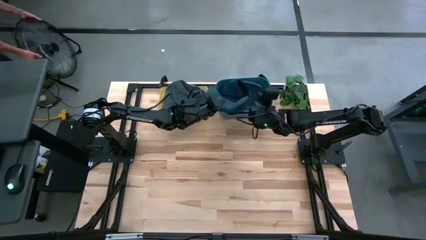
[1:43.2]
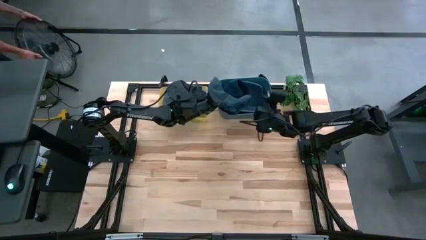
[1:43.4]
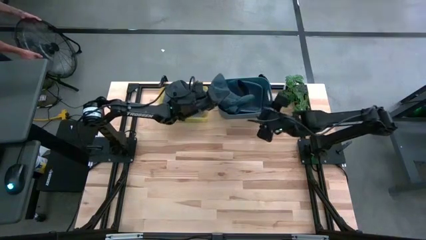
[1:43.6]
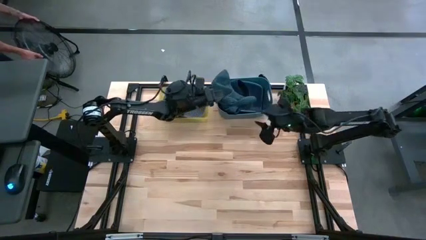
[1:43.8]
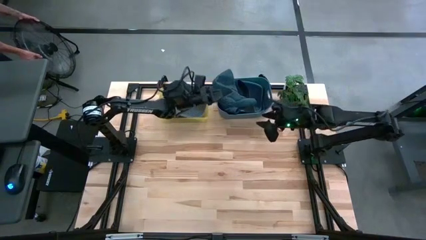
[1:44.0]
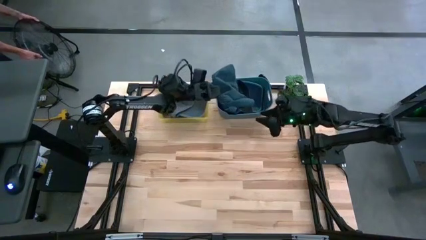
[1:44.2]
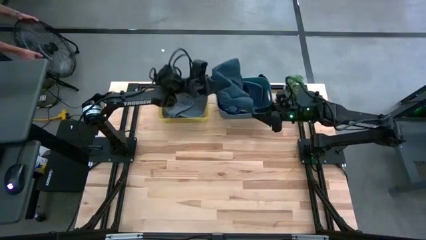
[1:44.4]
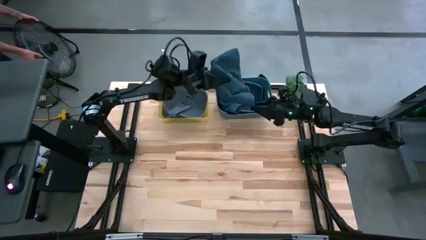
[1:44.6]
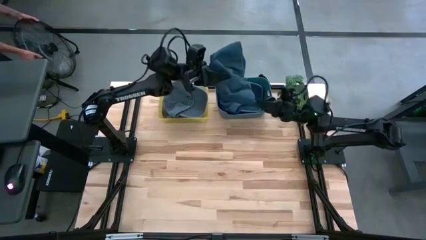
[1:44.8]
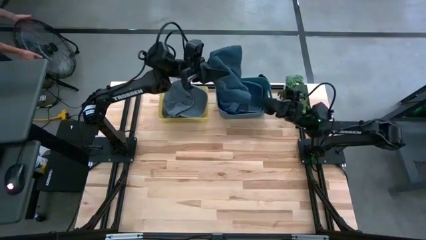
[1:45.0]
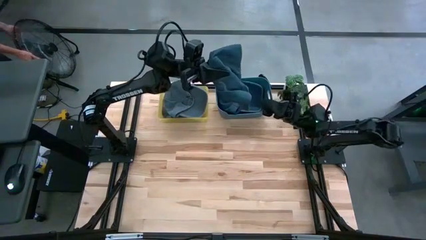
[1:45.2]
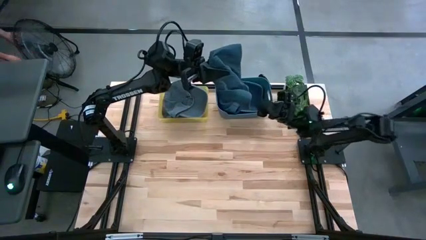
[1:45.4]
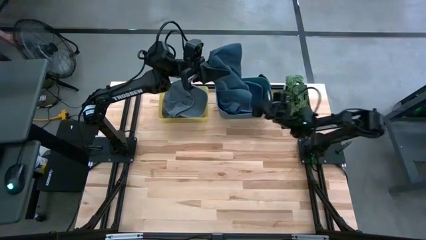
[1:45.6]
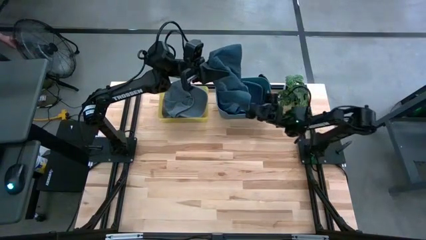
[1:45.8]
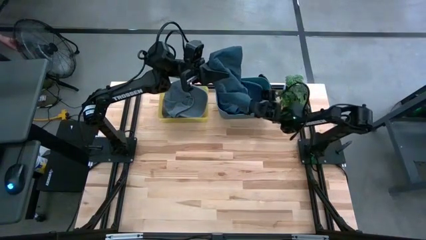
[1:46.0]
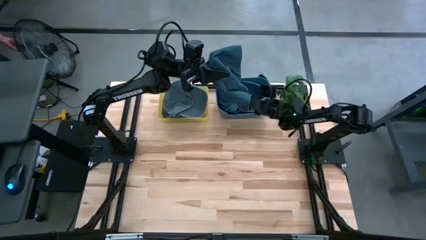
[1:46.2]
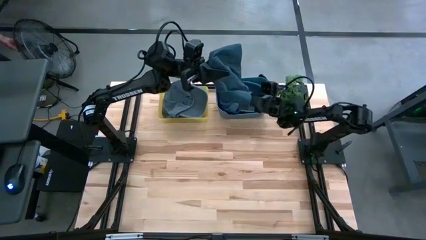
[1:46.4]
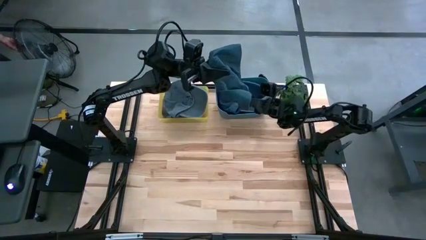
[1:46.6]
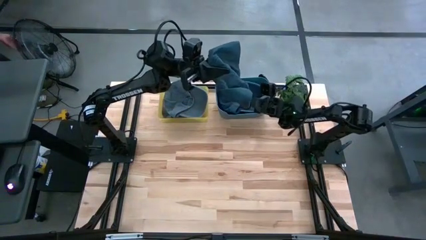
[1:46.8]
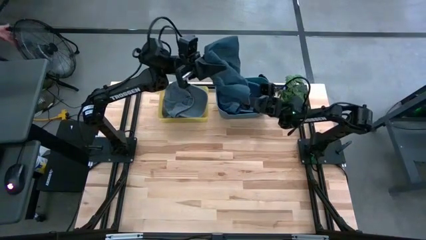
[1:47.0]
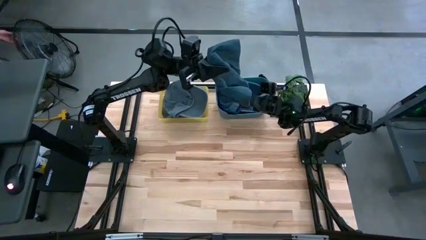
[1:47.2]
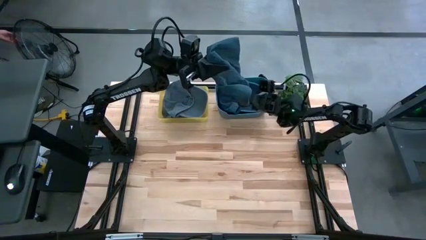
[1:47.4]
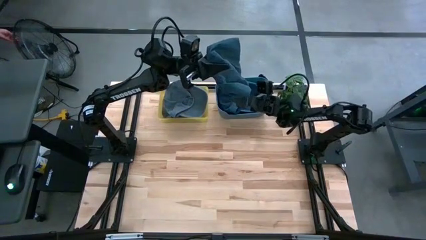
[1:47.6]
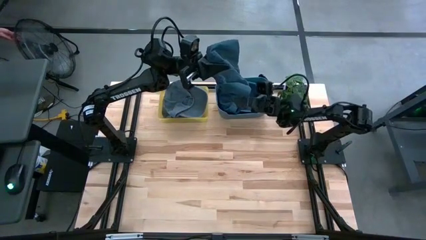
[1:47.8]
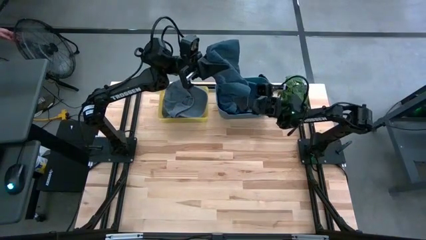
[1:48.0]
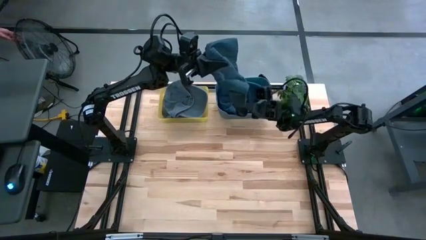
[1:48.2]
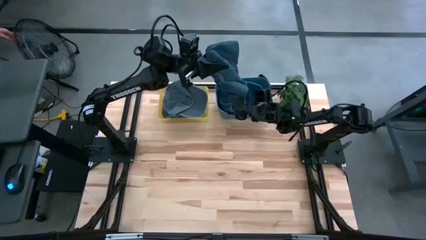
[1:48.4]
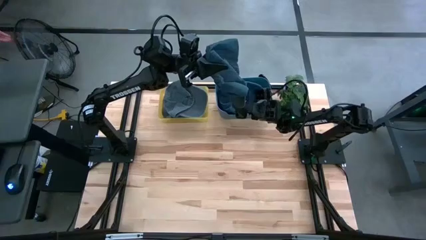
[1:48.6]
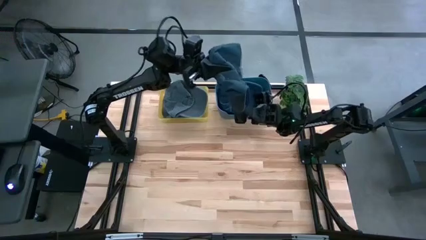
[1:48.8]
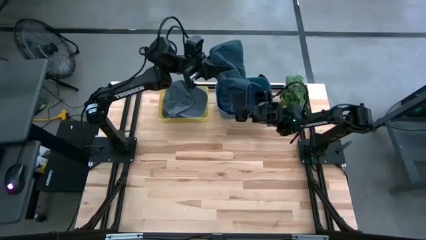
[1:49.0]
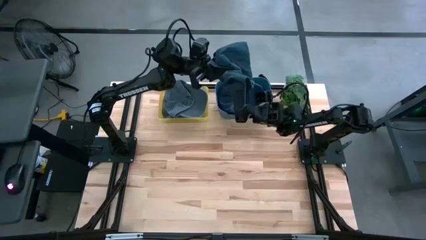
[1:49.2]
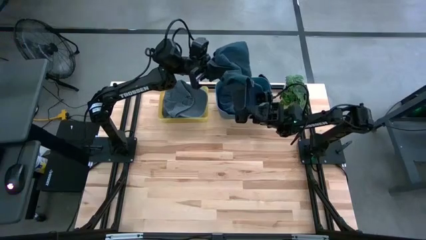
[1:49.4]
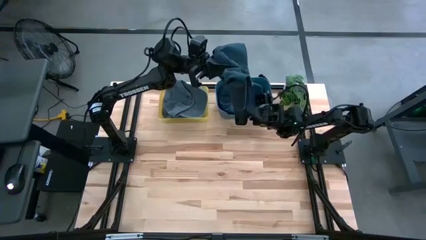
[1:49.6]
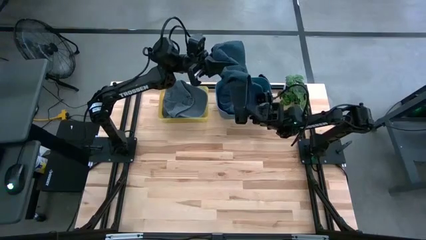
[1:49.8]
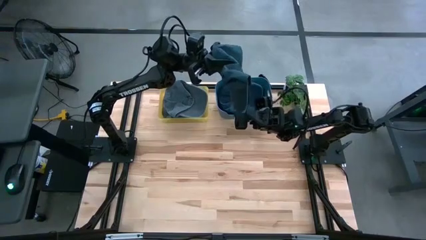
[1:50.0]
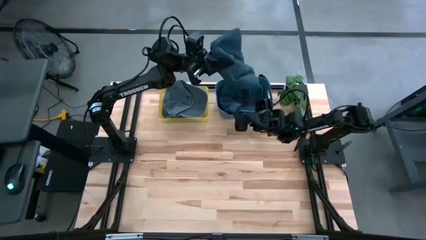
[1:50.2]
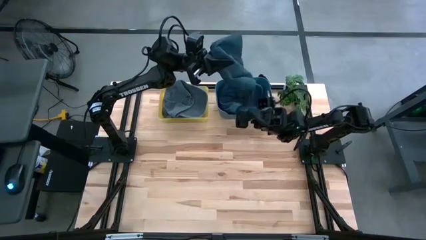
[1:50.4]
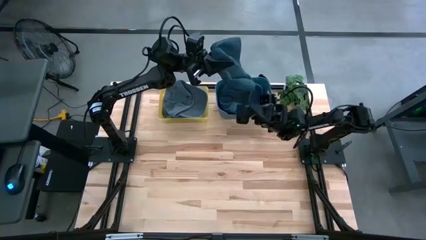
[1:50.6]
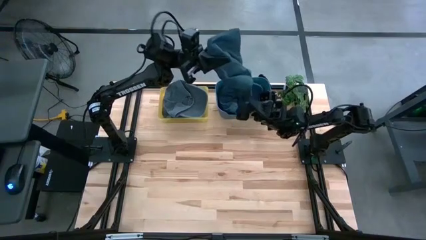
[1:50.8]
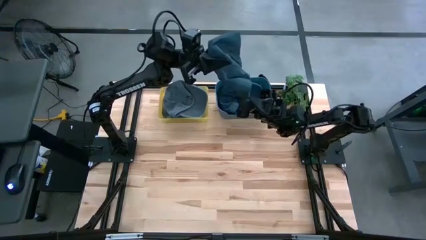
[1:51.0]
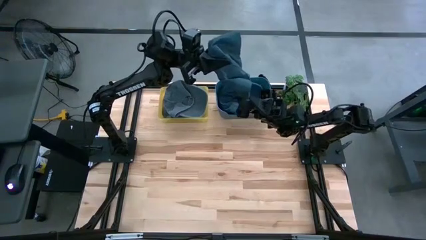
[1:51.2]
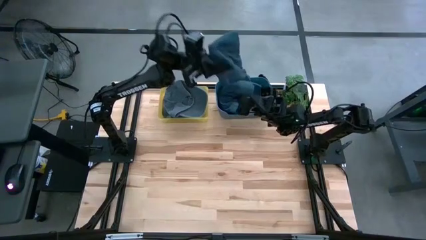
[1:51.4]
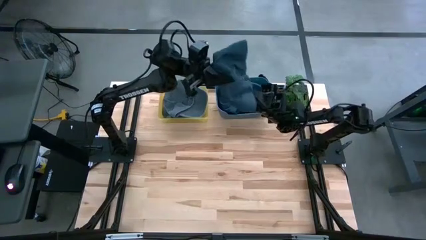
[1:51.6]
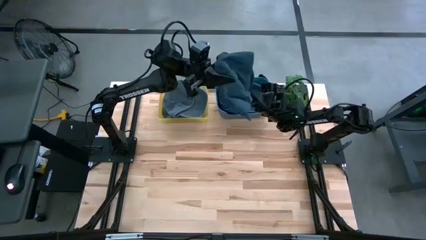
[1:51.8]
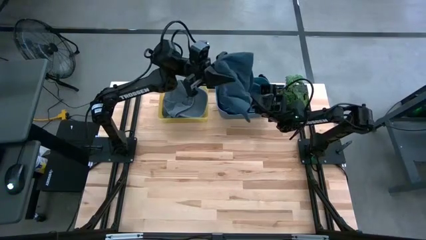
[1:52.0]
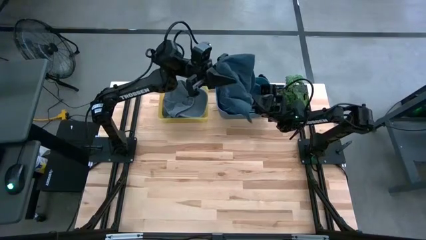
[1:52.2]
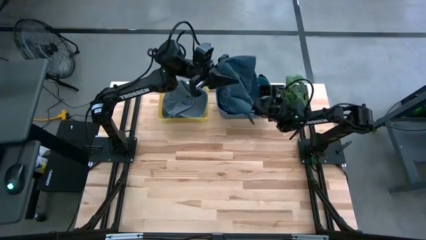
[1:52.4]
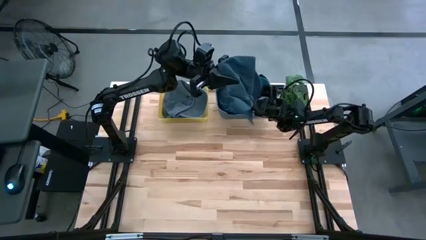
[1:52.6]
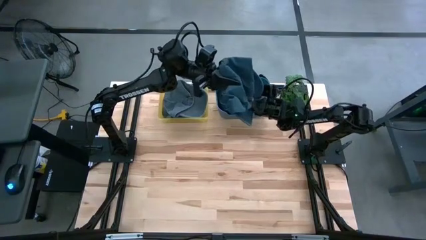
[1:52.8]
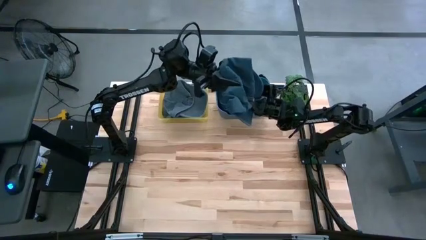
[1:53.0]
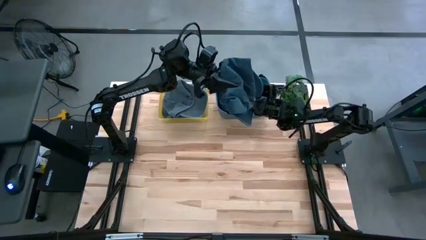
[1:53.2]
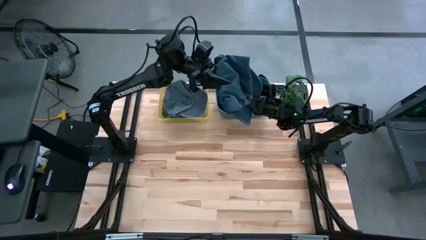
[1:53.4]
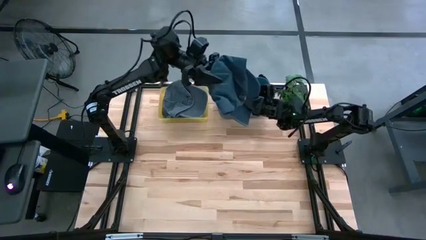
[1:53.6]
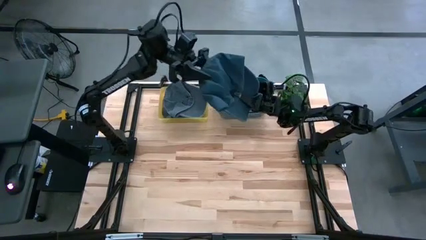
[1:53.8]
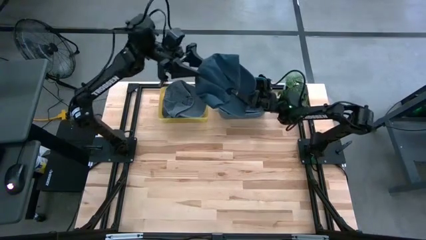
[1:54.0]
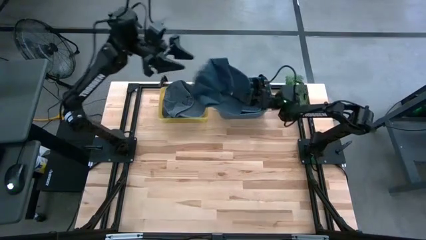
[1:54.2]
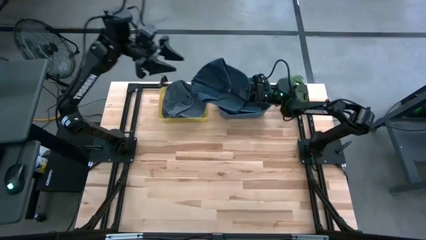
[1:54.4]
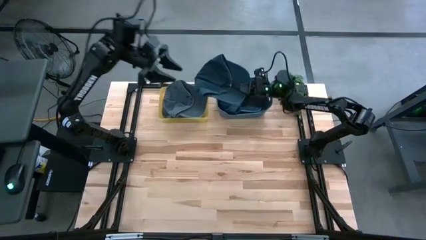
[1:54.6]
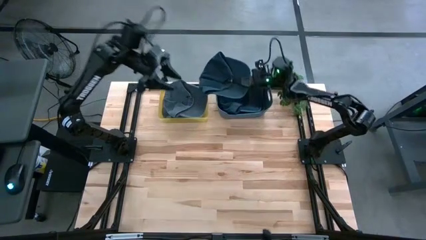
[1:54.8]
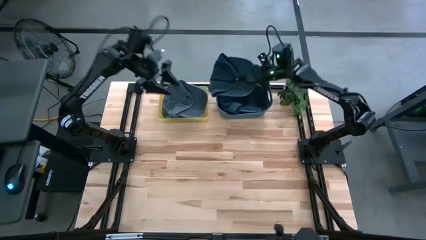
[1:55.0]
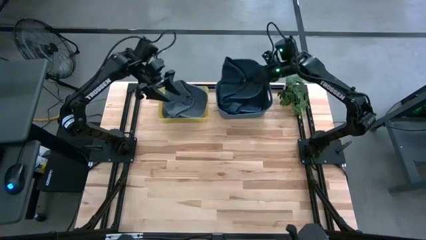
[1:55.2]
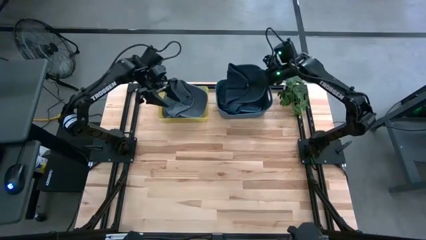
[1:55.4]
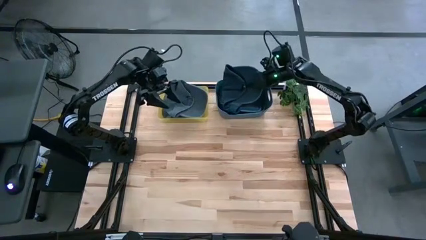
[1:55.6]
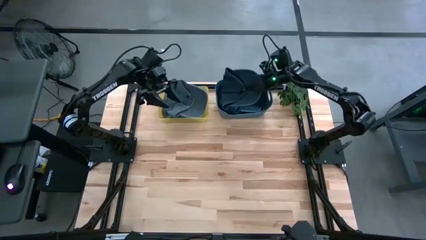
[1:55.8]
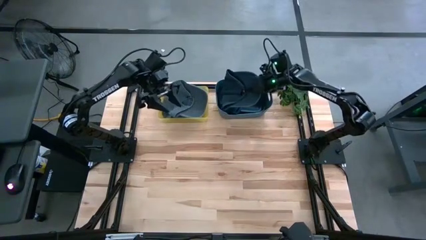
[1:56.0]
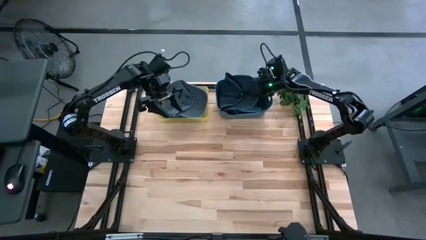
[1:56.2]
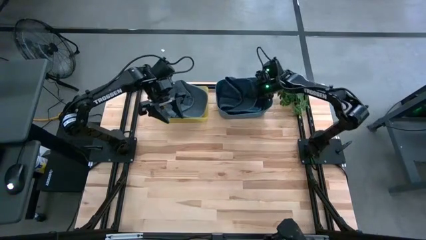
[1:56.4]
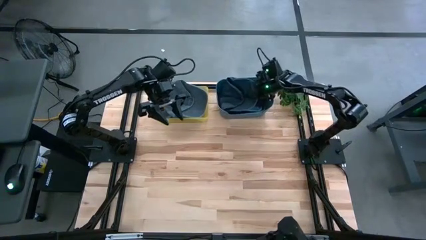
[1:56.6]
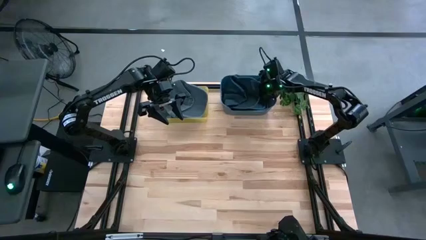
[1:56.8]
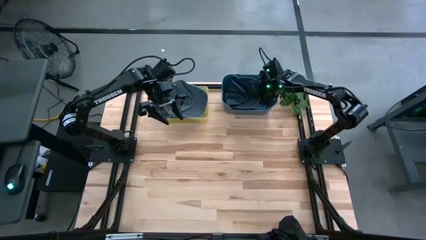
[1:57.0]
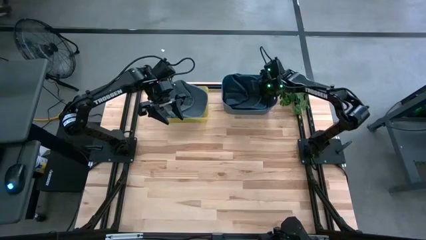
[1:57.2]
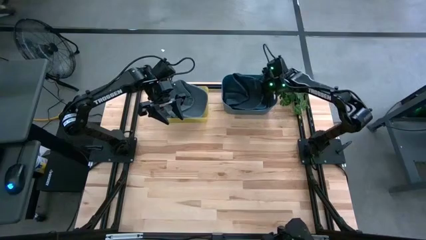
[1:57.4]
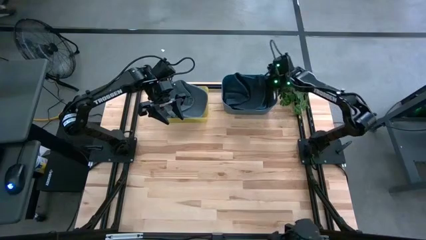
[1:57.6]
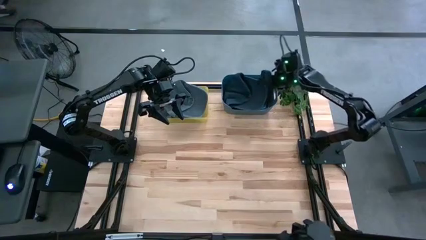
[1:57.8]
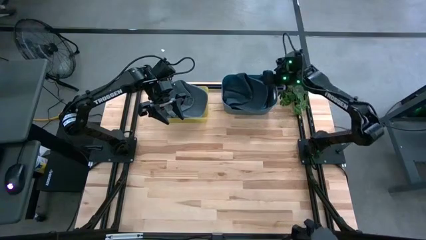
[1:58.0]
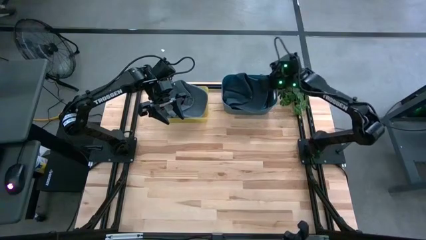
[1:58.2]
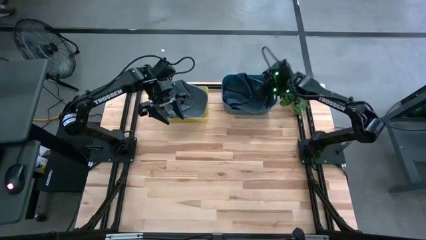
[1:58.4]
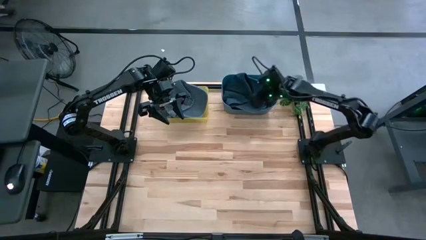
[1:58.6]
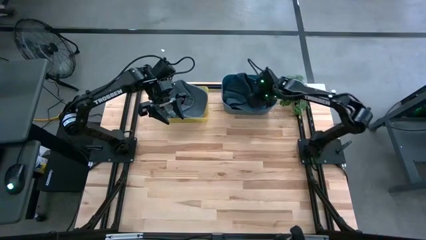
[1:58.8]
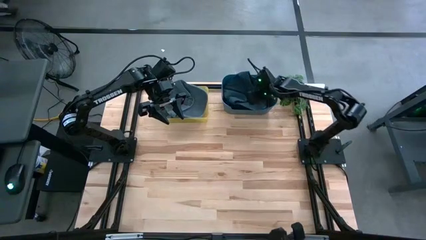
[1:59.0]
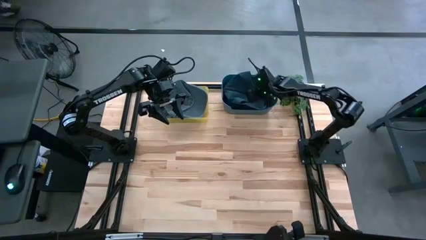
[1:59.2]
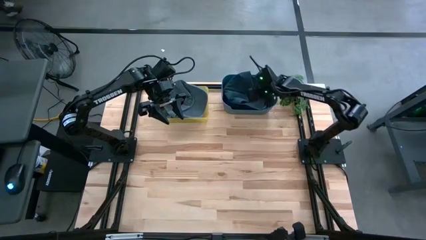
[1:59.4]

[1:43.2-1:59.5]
Task: Pick & Place hat
Put the blue cap into the blue bin

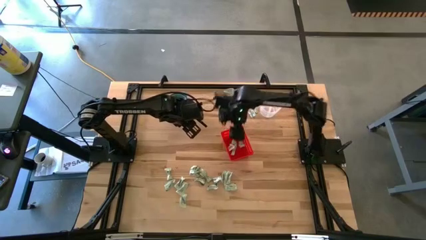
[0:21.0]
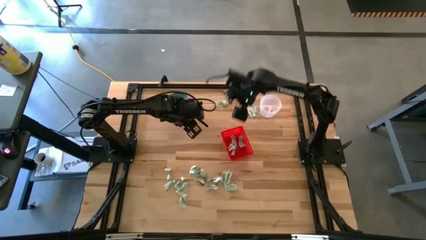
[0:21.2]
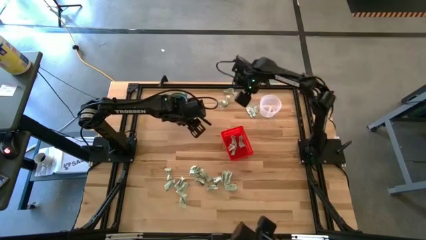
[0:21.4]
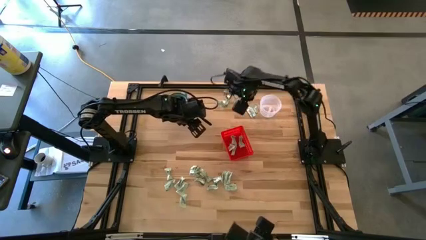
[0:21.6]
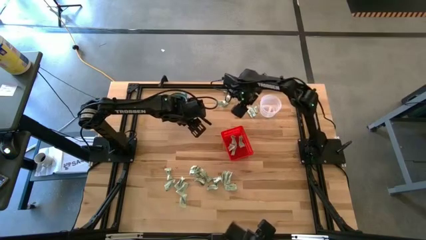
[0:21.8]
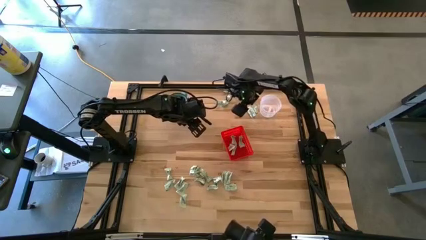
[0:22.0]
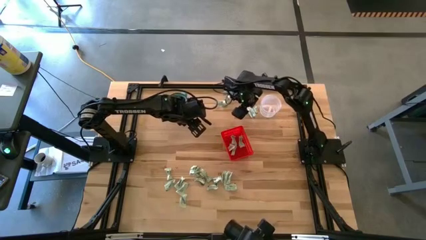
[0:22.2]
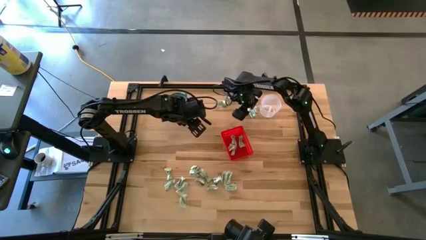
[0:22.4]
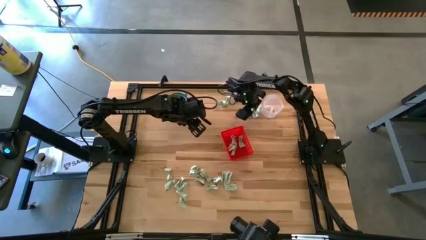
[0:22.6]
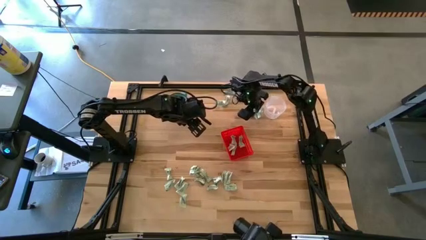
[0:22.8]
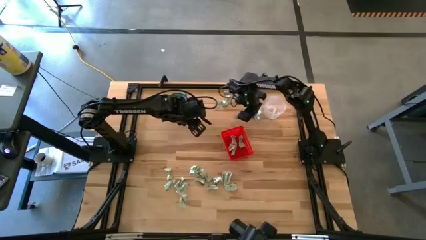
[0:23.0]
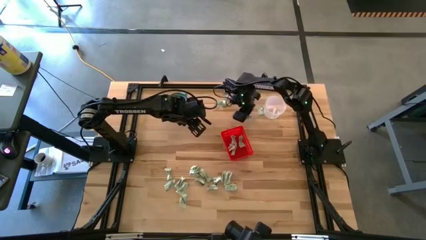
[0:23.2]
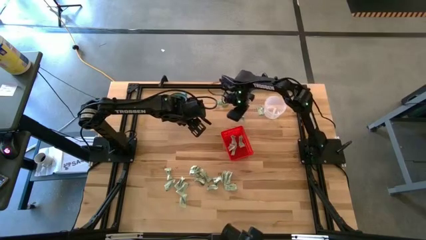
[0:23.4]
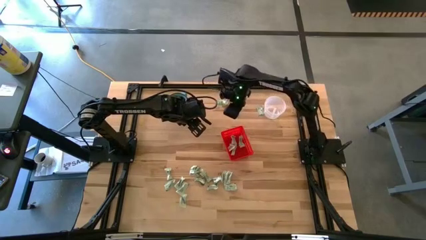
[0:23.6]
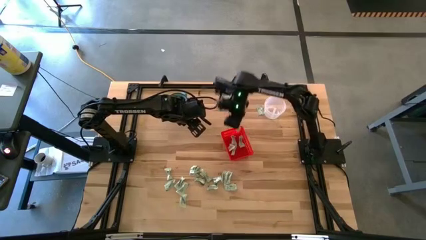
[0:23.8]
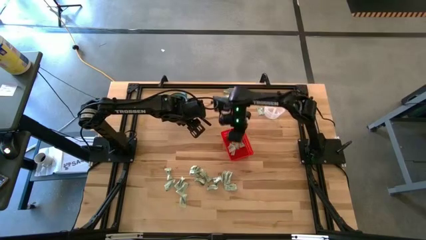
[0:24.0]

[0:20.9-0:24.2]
Task: Pick and place items into bin
Put the stevia packet into the orange bin
